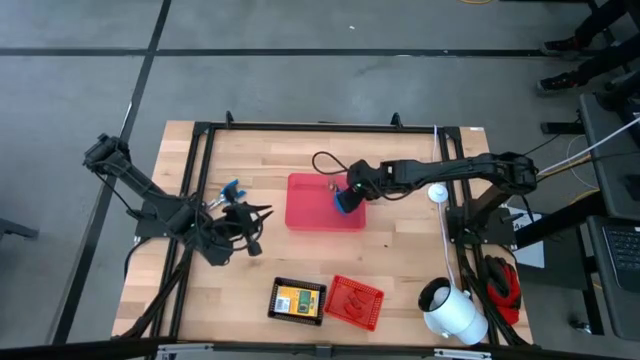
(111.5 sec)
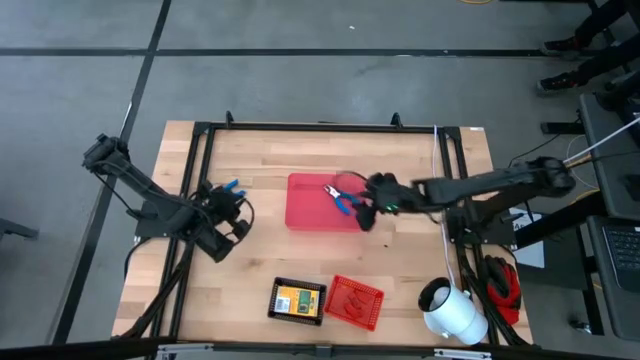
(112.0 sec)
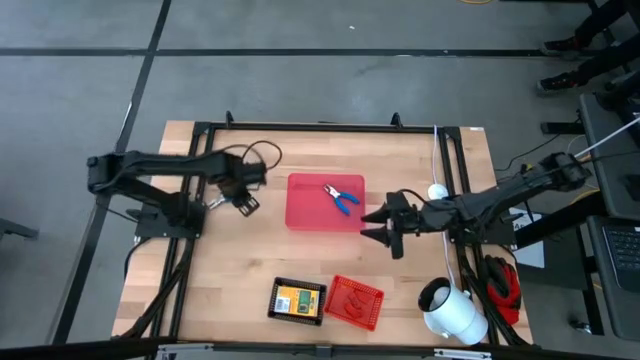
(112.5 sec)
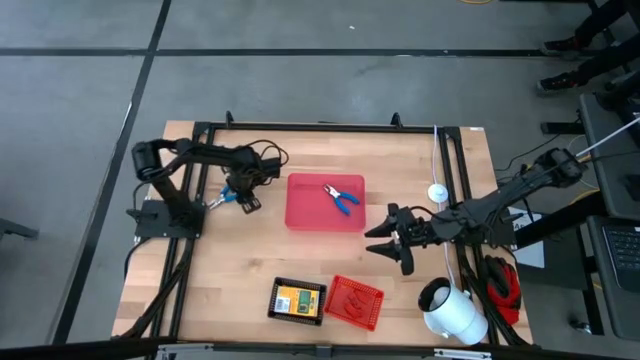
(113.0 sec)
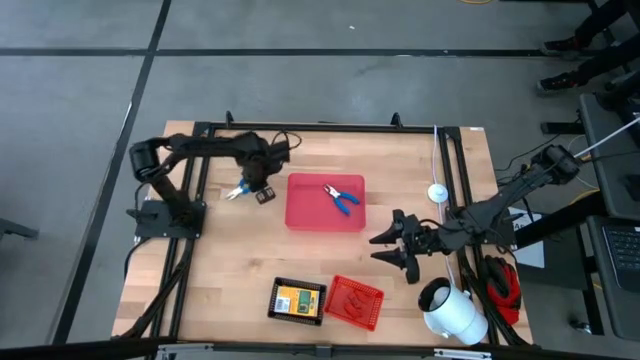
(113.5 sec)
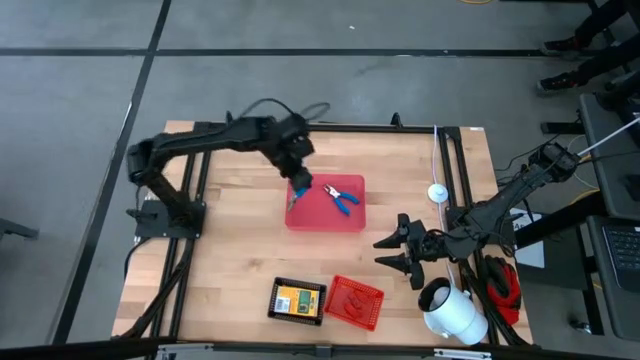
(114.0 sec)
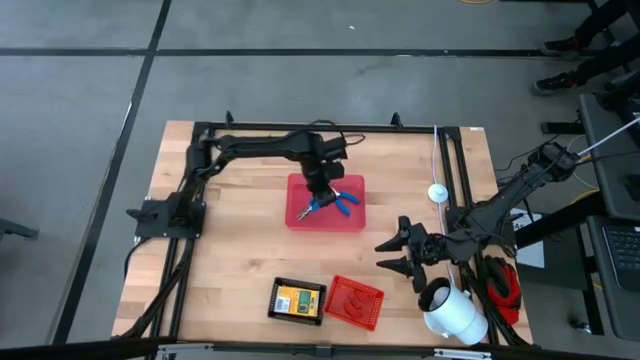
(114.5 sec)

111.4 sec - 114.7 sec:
Task: Pick & Place School Supplies
Put the blue paper puncher into the pink bin

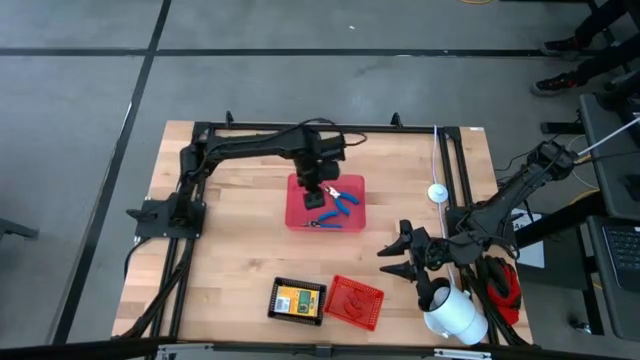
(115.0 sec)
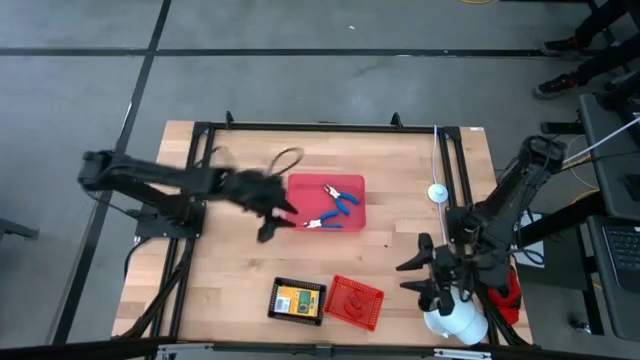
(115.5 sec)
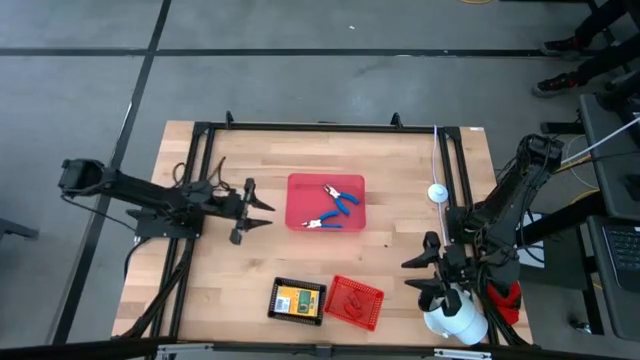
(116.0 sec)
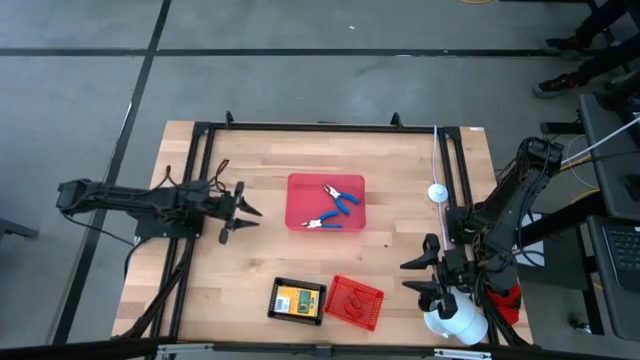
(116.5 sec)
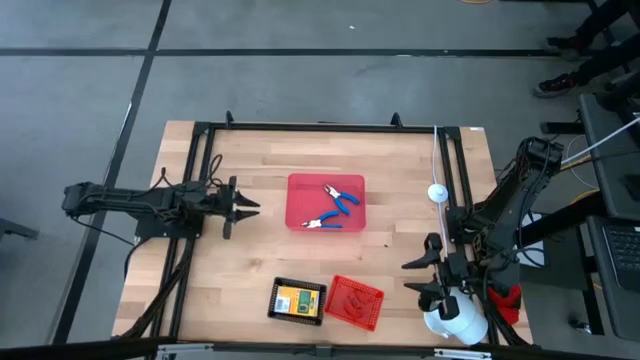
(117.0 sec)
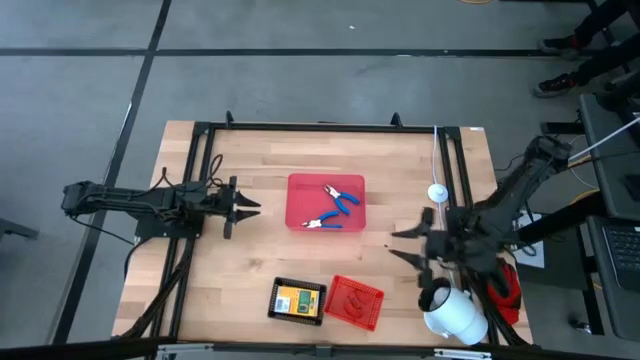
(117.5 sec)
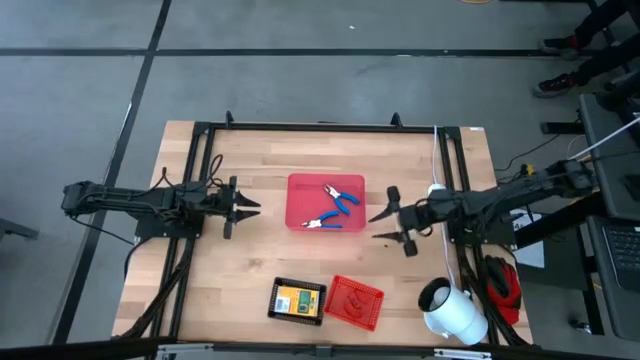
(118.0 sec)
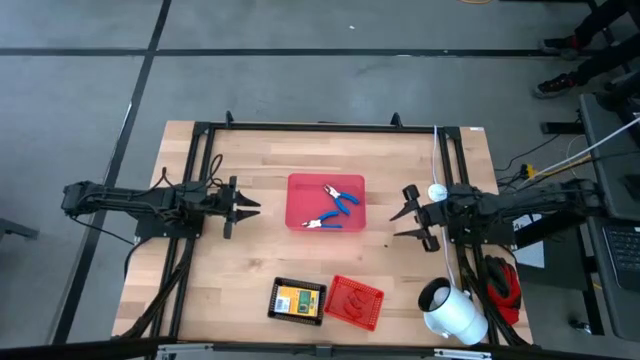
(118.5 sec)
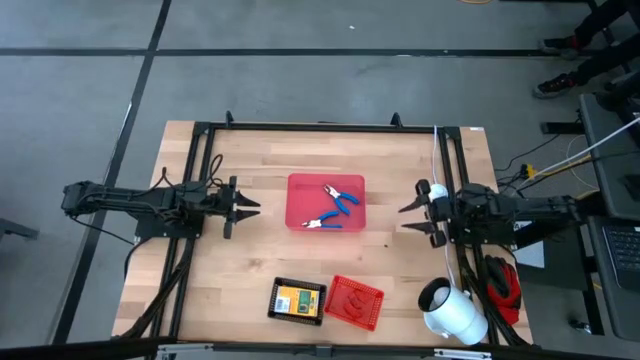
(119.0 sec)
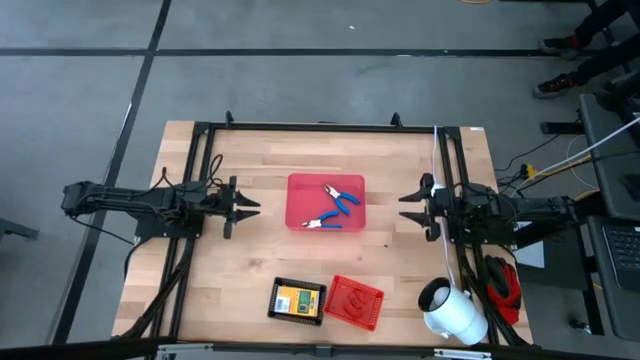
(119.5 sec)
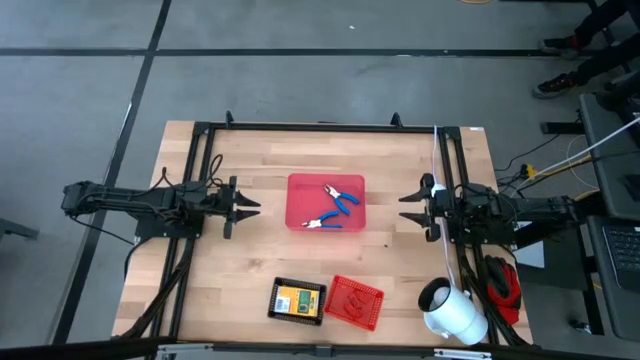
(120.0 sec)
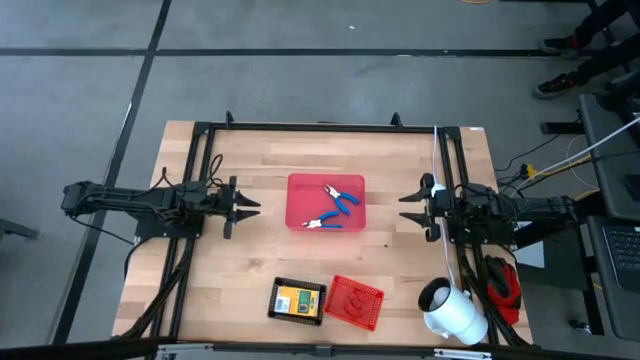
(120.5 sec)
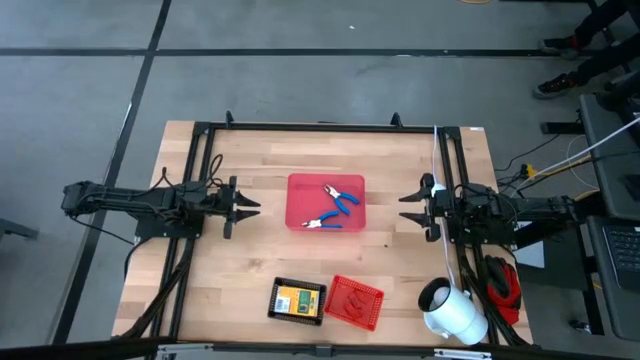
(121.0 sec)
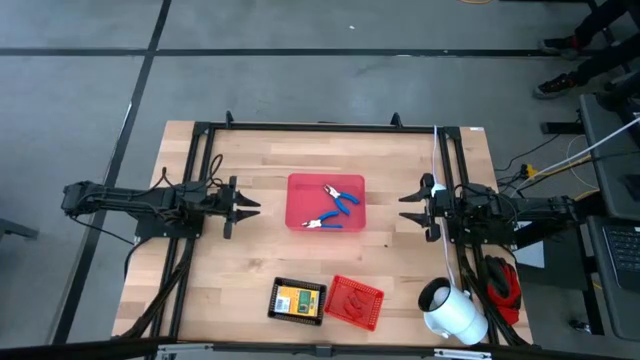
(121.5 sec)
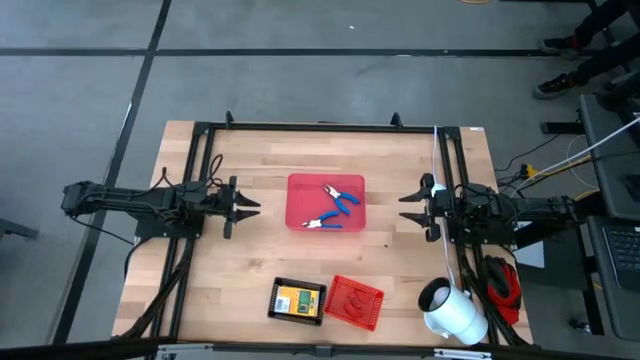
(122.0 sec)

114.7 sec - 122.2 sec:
Return to Home Position

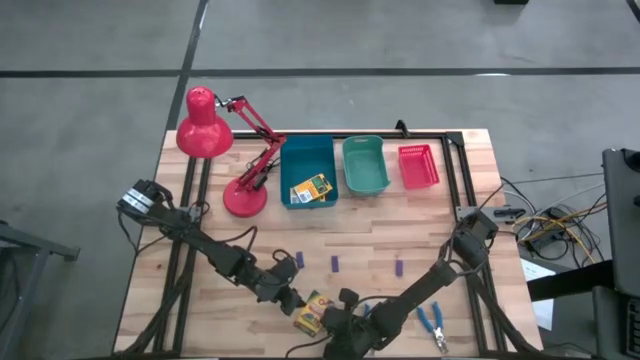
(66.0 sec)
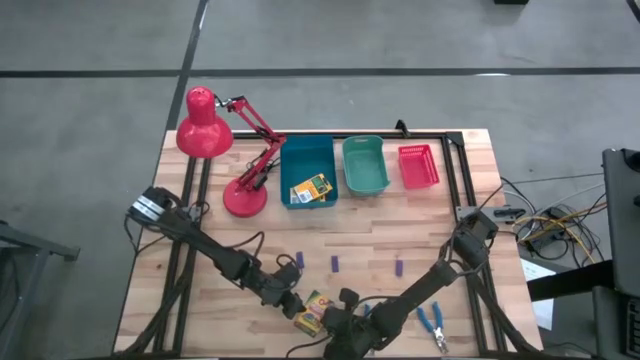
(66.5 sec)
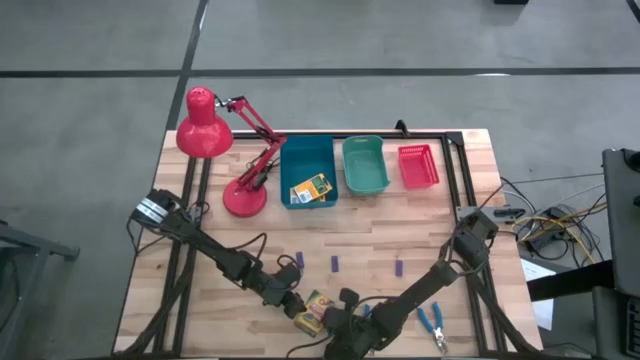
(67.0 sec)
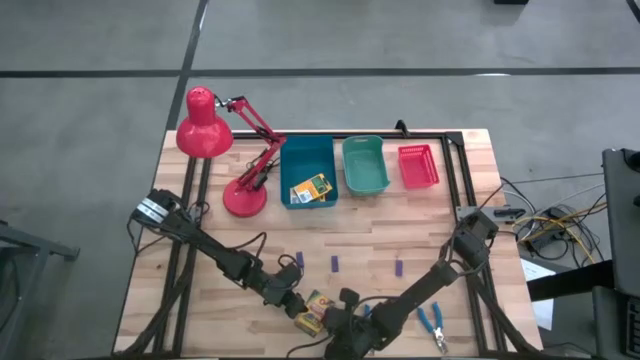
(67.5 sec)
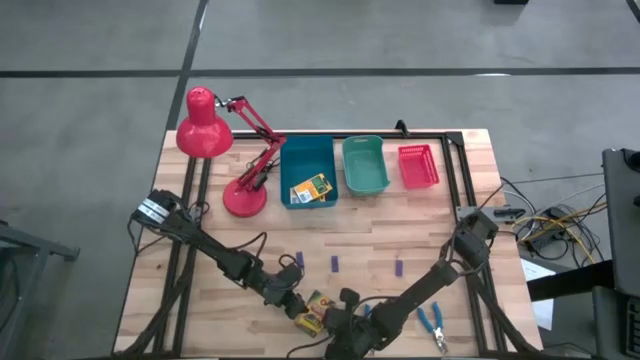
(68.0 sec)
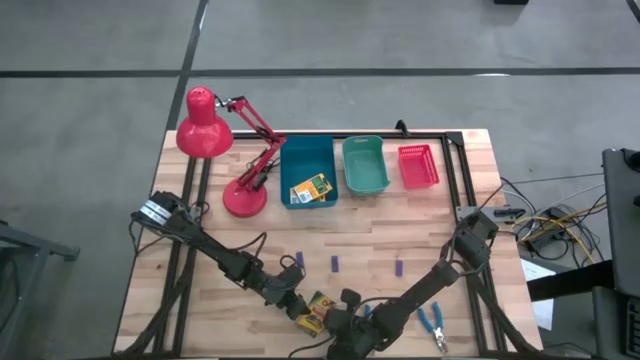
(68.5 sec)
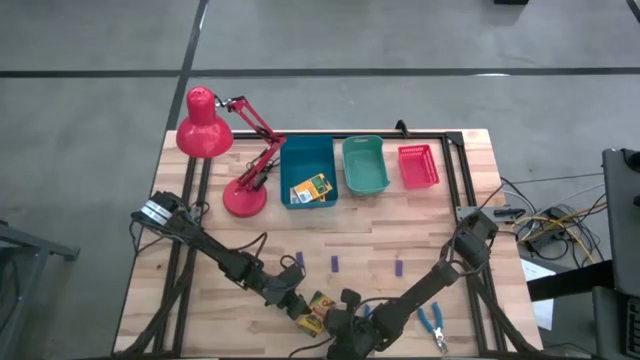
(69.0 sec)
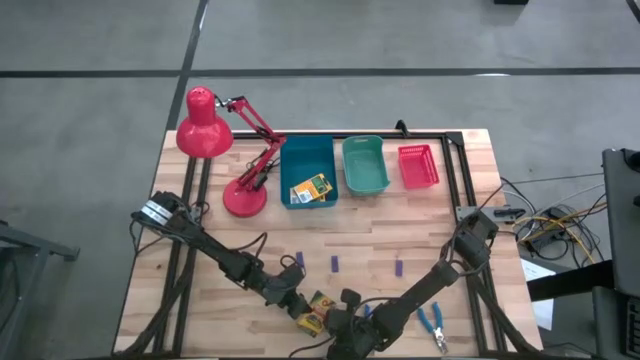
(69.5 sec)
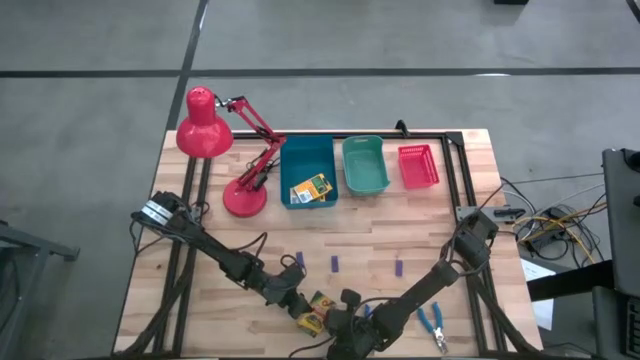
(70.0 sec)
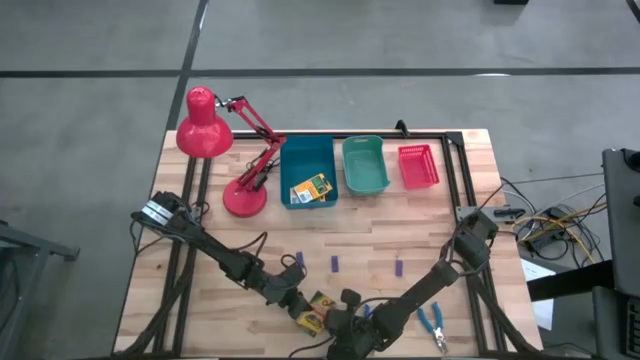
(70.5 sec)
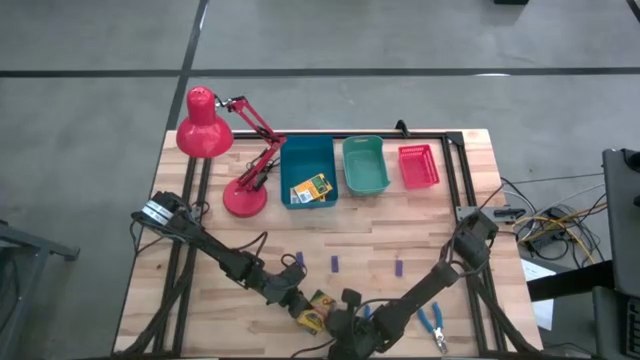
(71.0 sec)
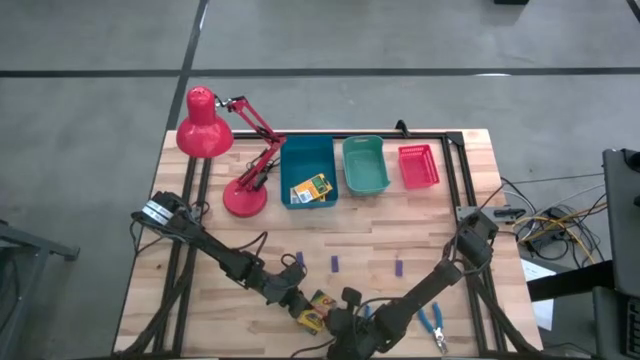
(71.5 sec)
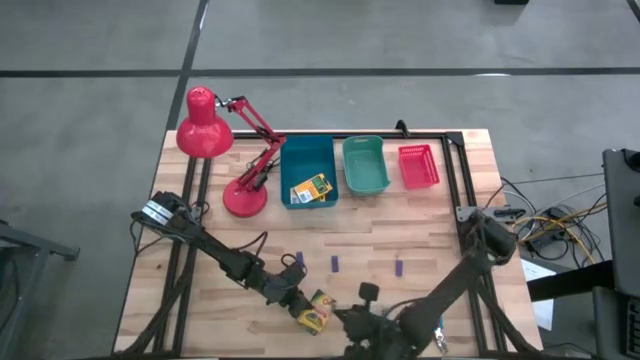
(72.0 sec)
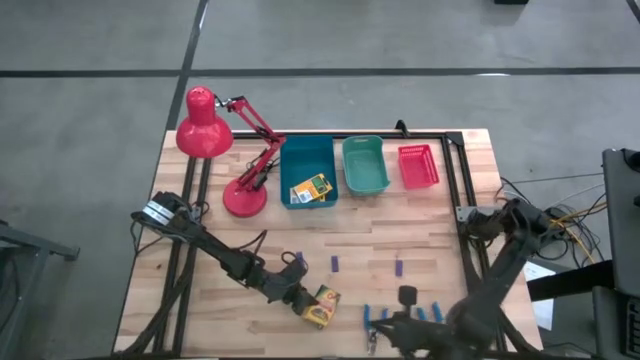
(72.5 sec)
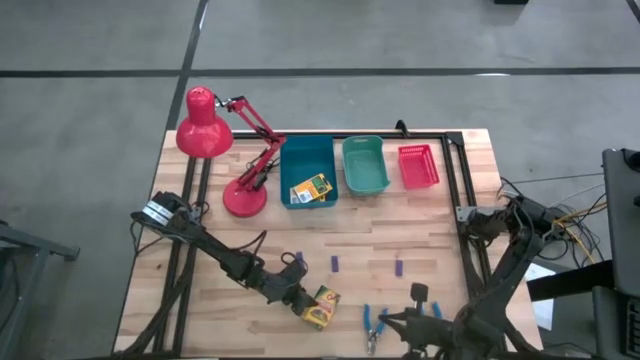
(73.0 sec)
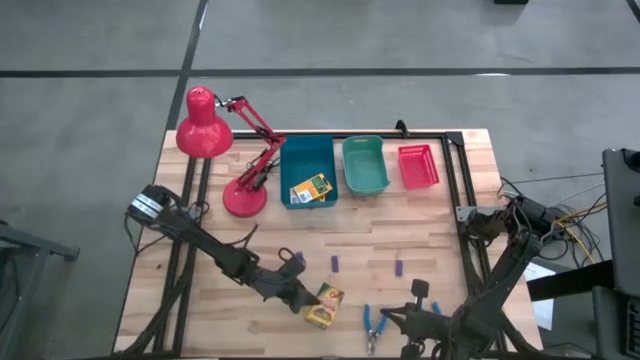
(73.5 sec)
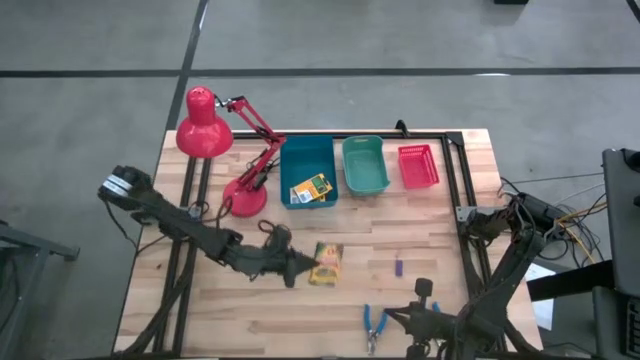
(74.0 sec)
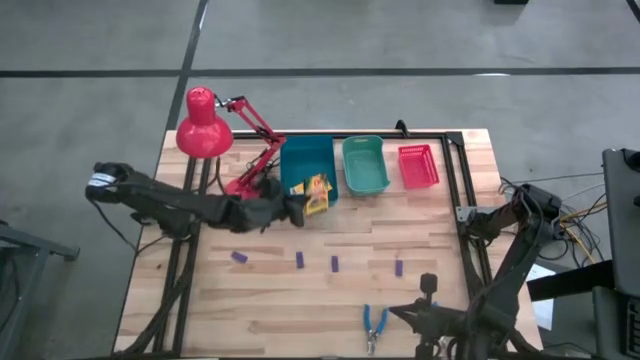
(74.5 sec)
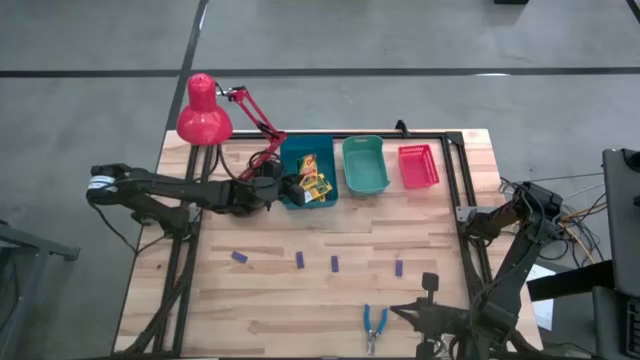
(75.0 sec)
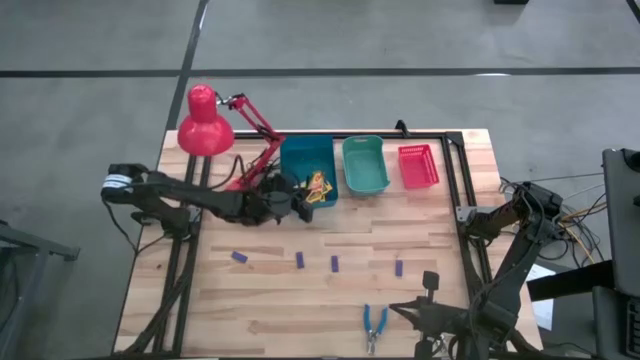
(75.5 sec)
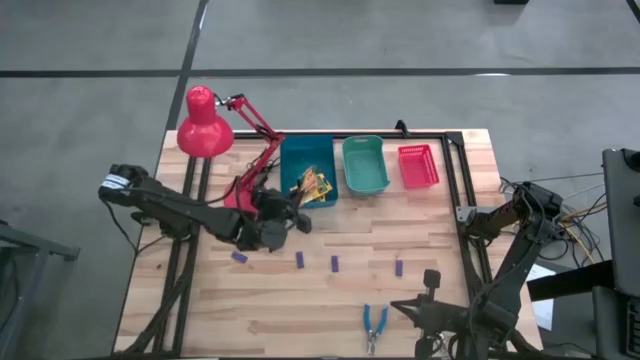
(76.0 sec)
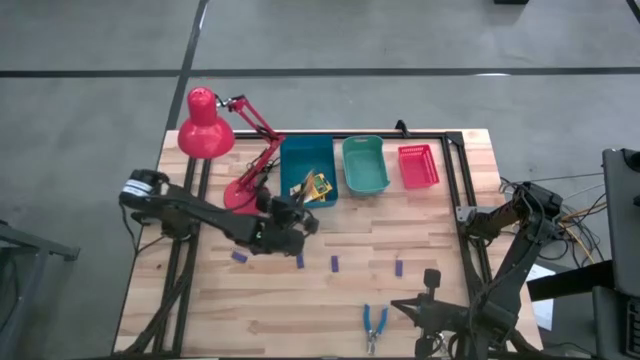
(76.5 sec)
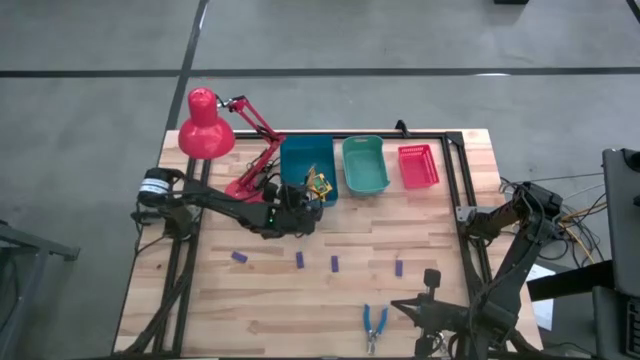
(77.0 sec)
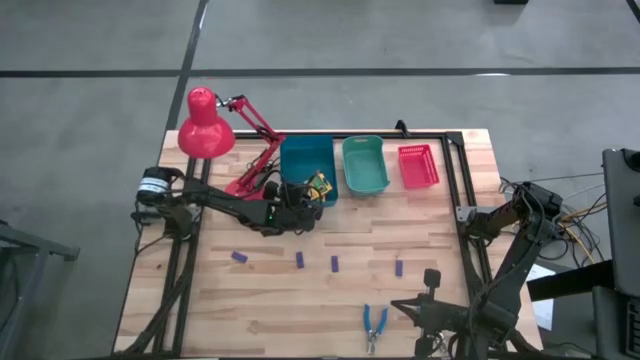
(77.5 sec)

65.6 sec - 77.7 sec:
Task: Pick & Place School Supplies
Put the crayon box into the blue bin
